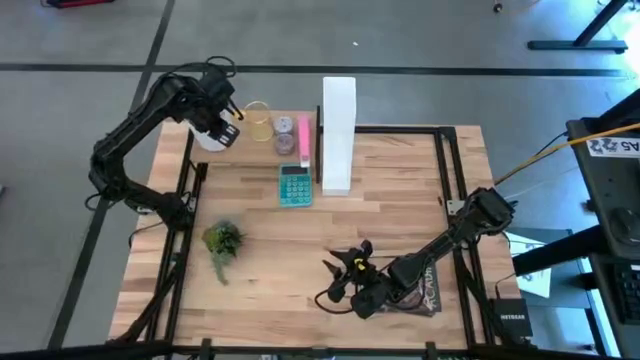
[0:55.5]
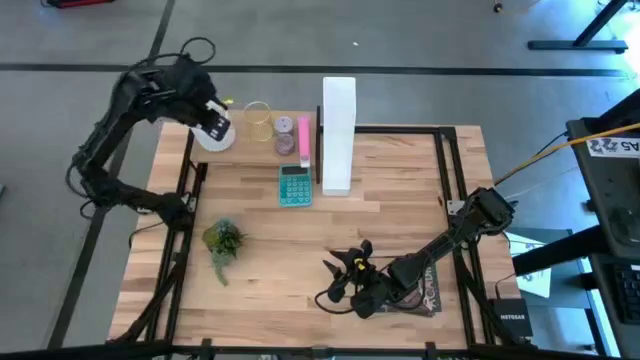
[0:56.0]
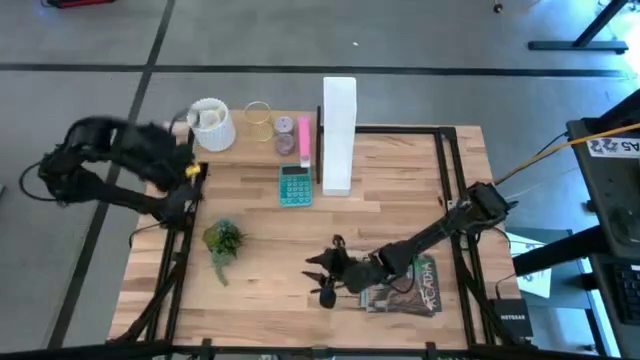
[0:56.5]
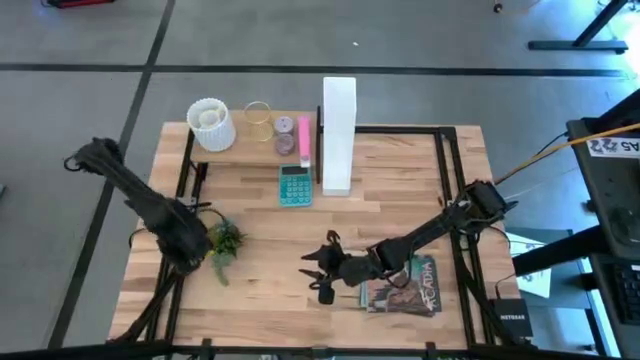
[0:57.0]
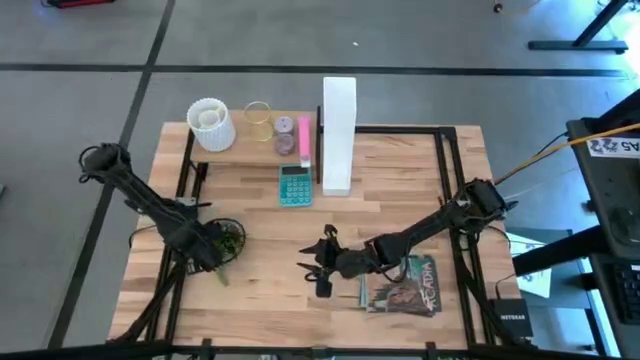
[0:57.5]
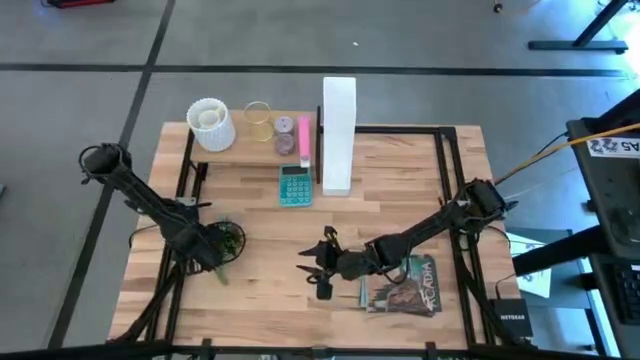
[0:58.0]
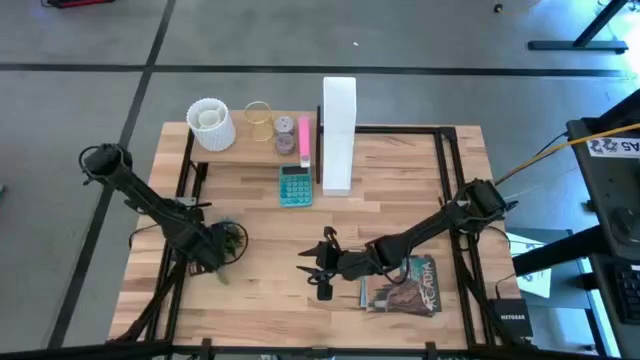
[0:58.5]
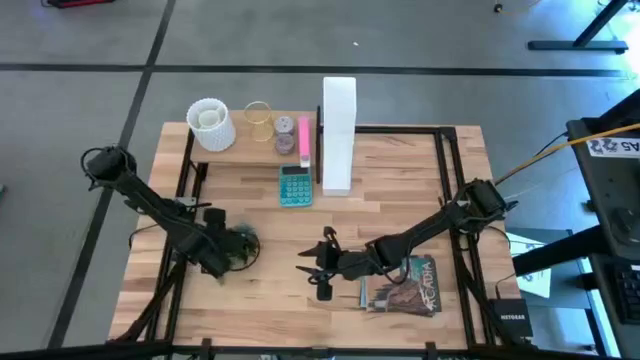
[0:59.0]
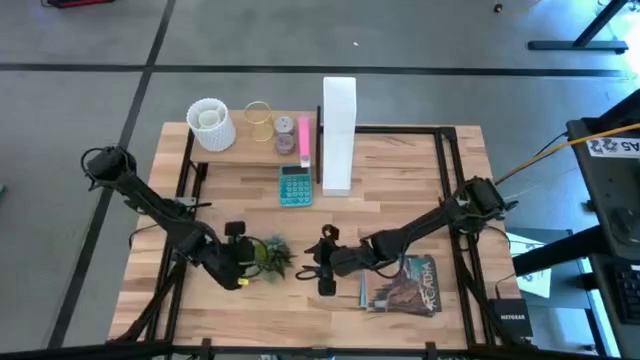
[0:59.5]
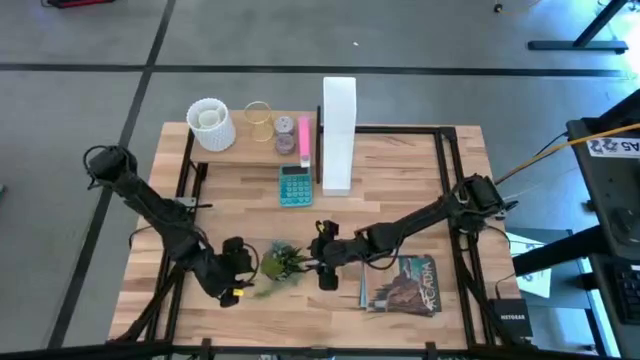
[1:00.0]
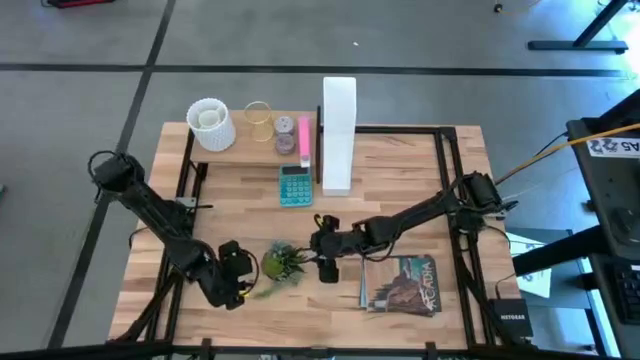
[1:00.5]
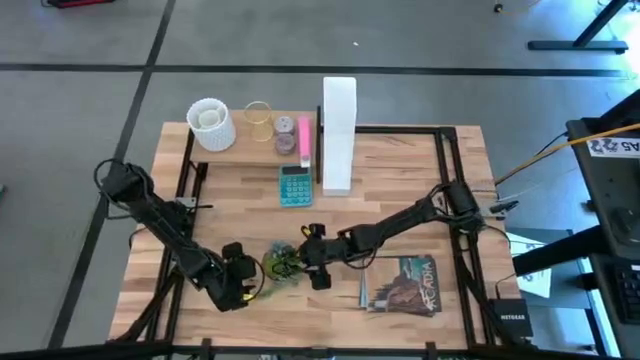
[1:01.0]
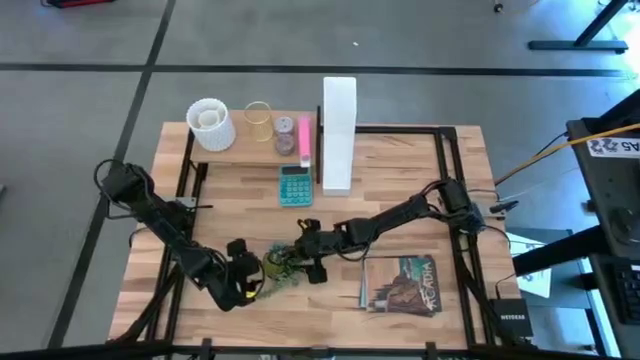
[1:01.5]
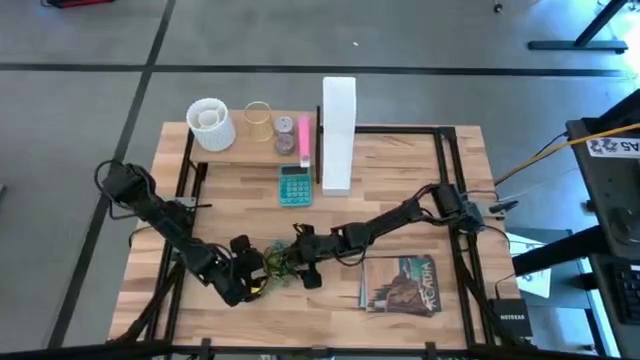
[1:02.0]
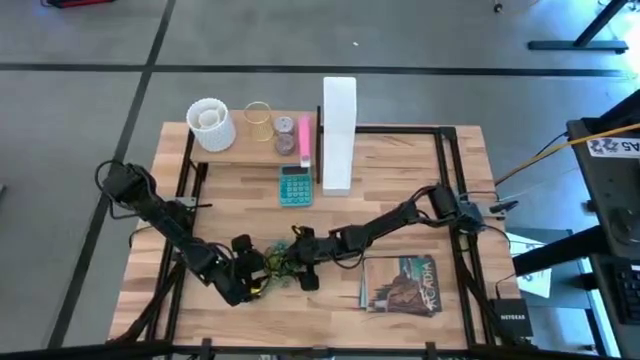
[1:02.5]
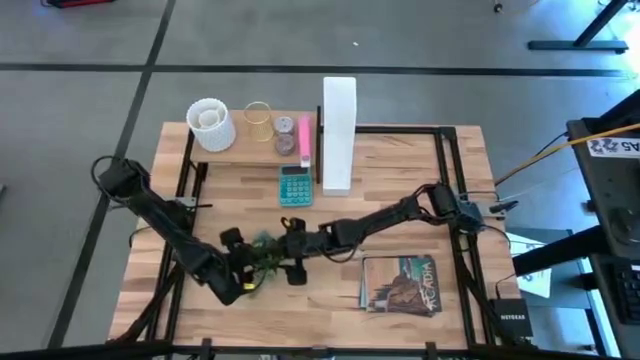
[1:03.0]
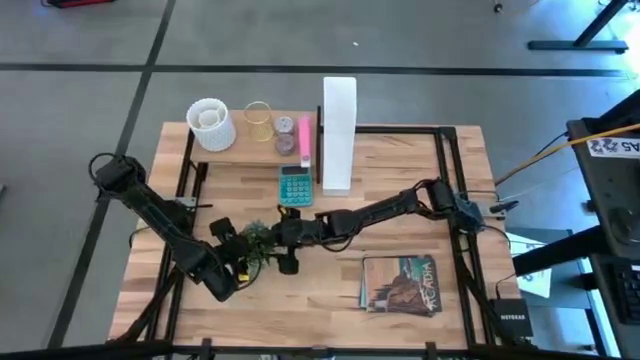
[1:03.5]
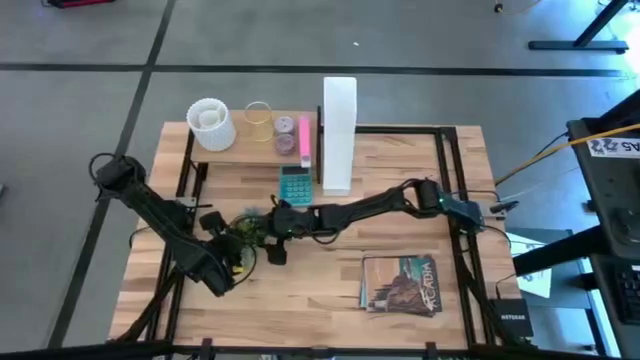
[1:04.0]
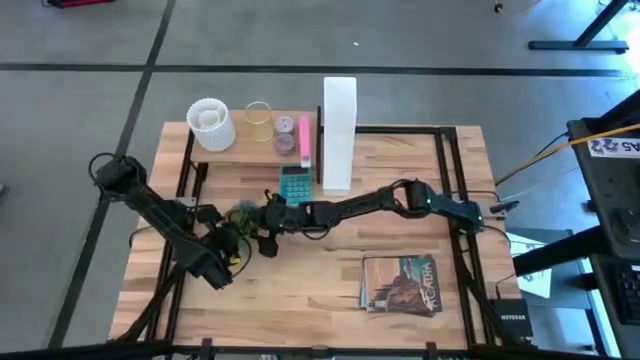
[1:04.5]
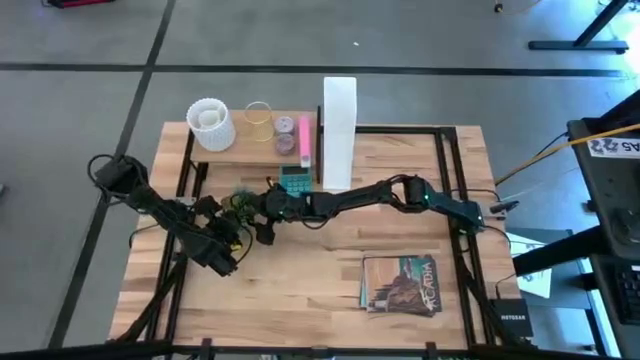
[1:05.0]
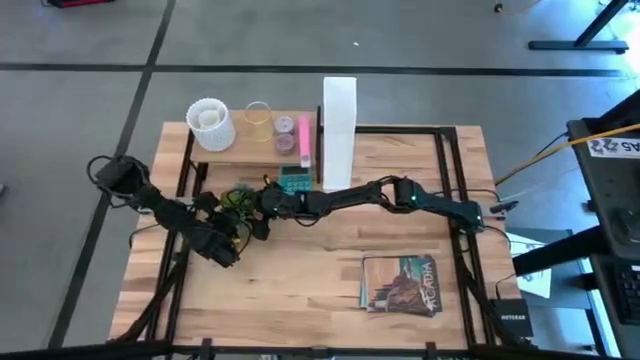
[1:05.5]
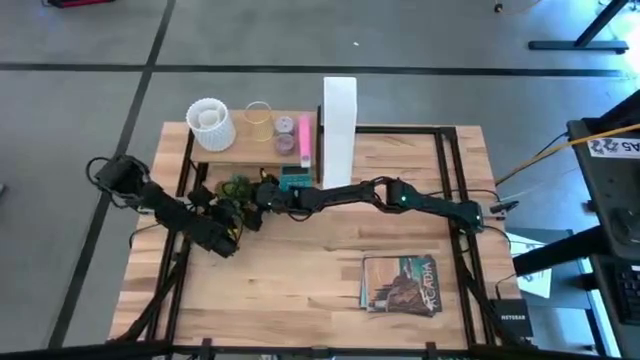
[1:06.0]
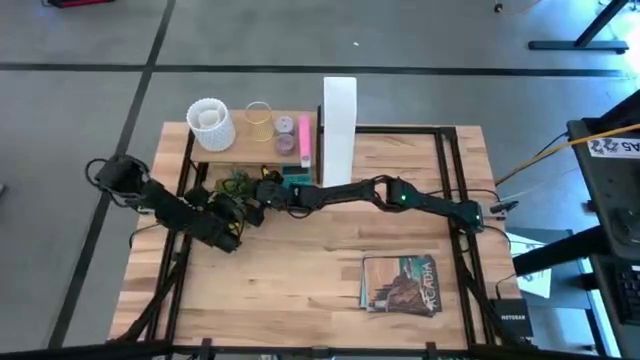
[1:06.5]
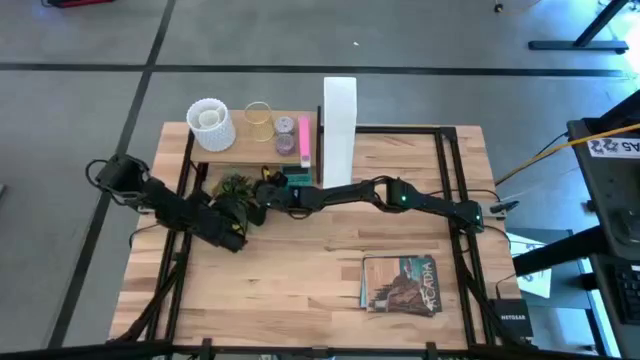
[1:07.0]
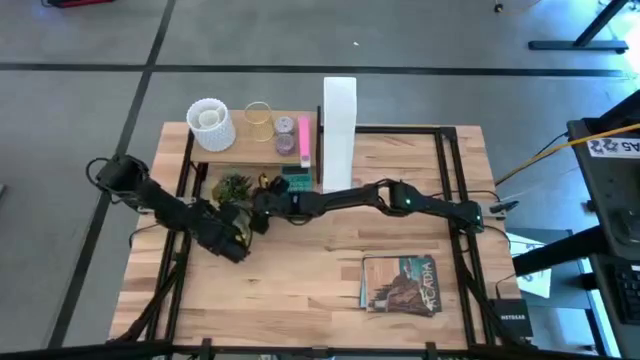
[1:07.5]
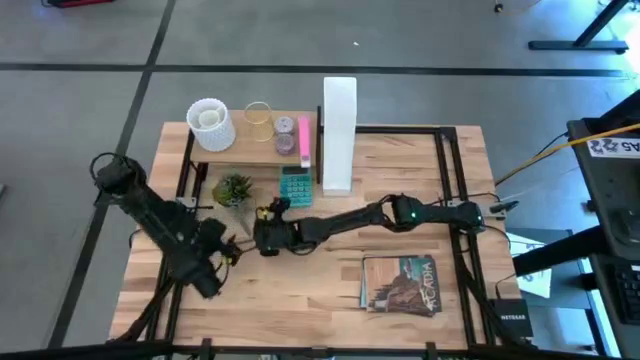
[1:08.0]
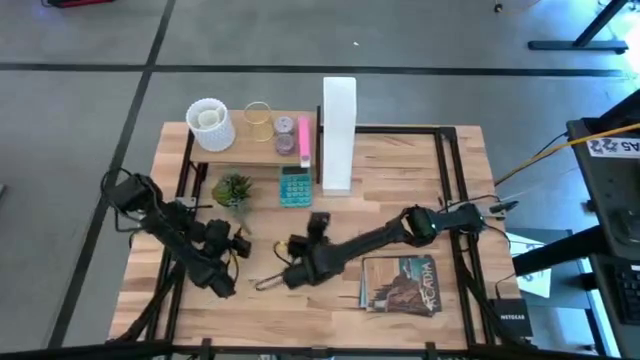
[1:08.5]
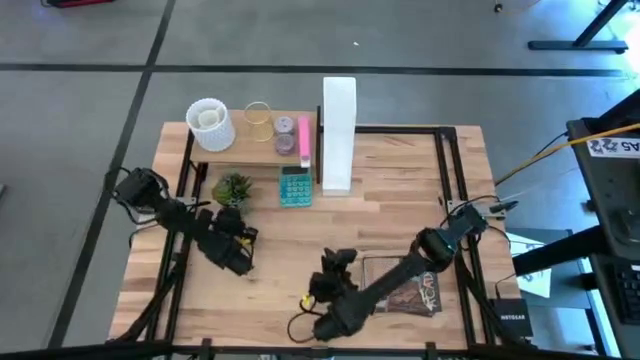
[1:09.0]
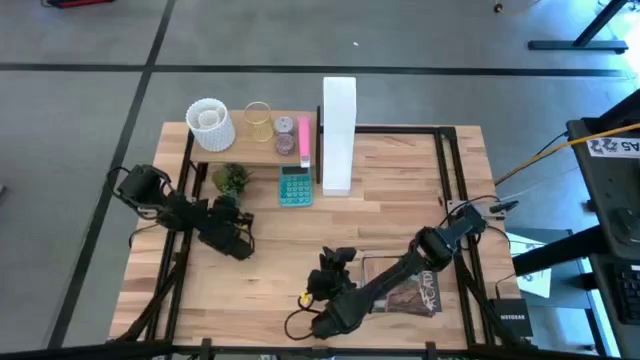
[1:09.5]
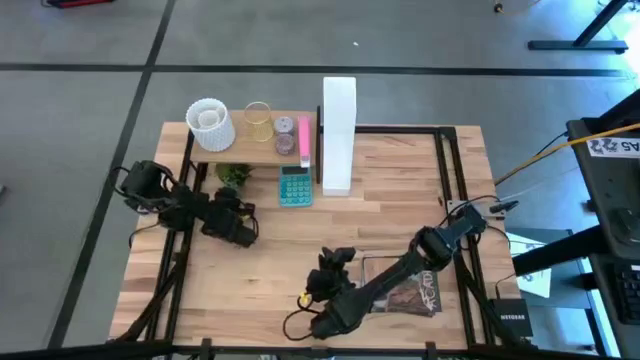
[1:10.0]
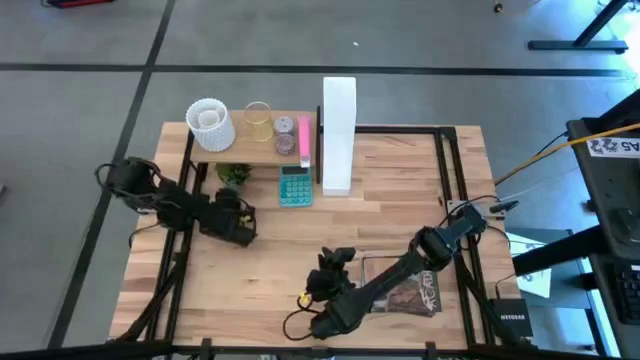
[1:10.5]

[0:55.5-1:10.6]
Task: Stock shelves
Put the plant pot under the shelf

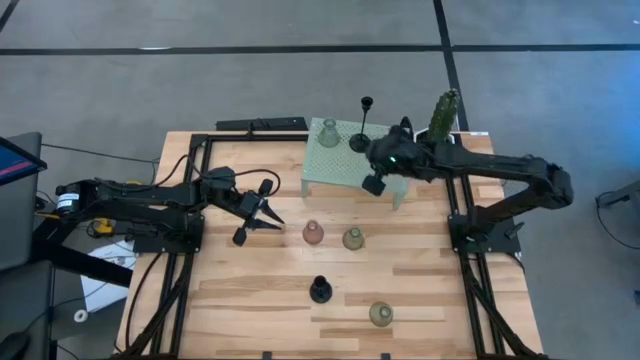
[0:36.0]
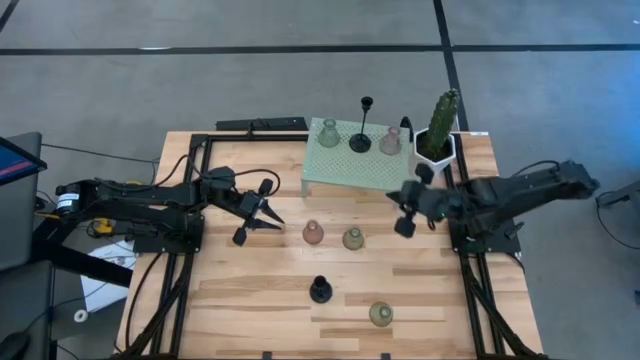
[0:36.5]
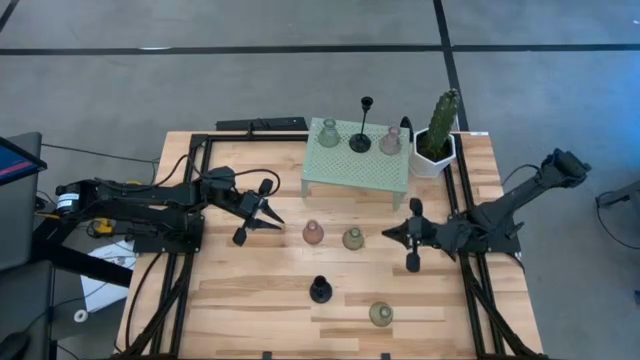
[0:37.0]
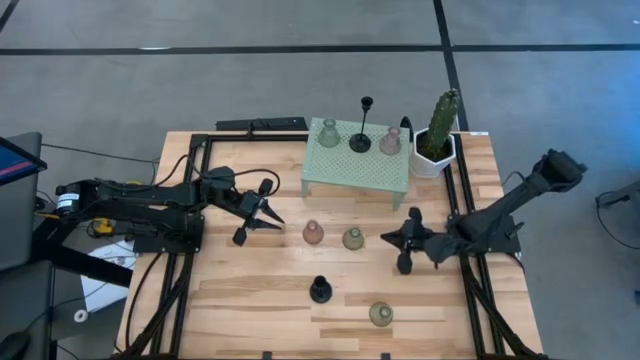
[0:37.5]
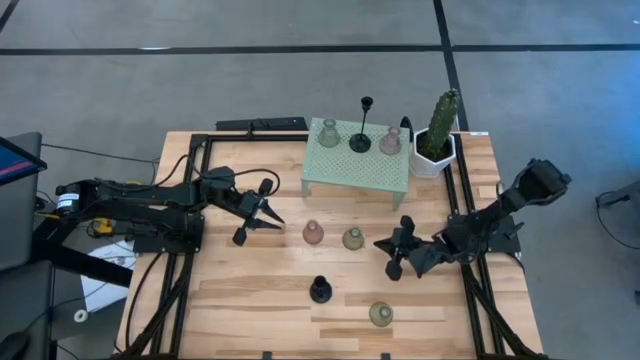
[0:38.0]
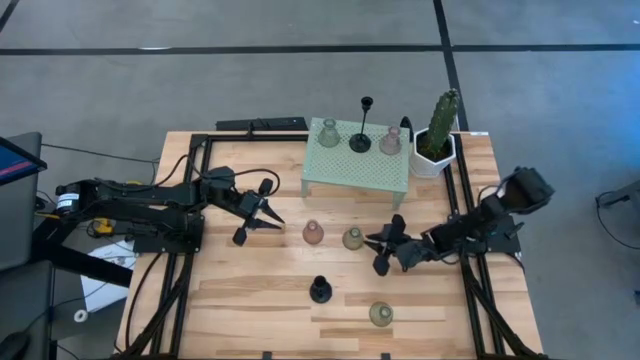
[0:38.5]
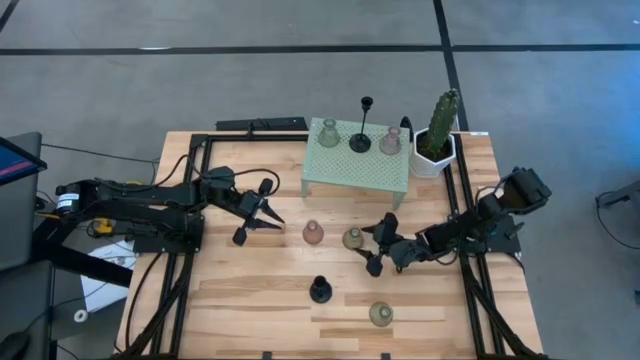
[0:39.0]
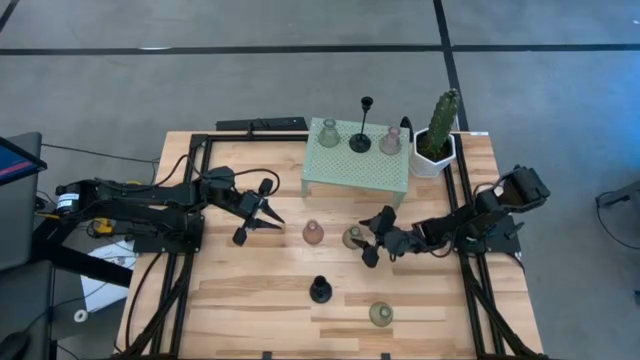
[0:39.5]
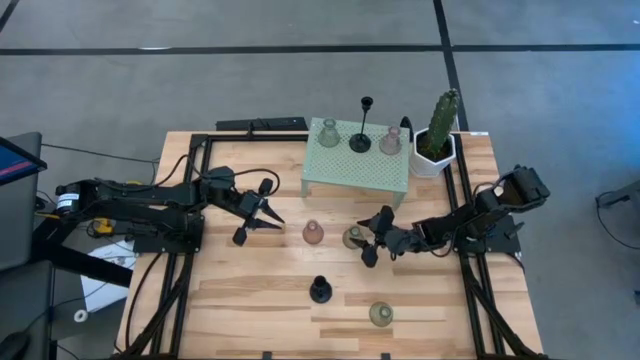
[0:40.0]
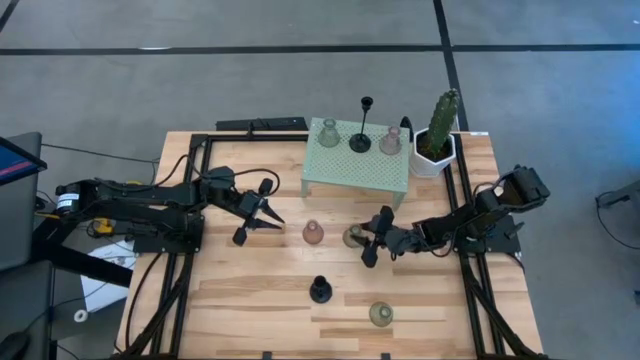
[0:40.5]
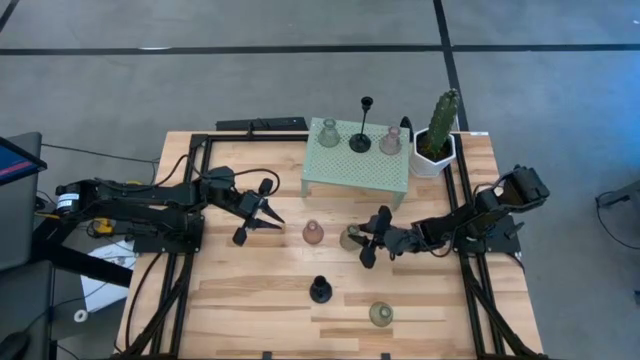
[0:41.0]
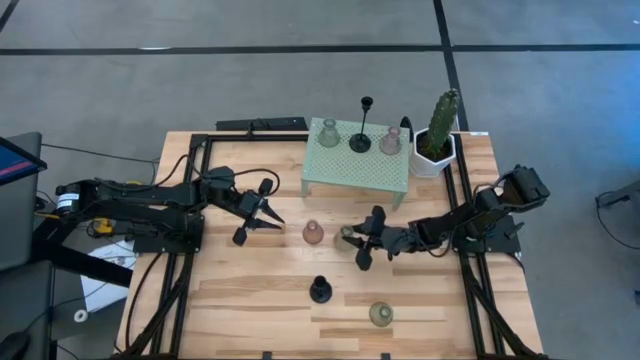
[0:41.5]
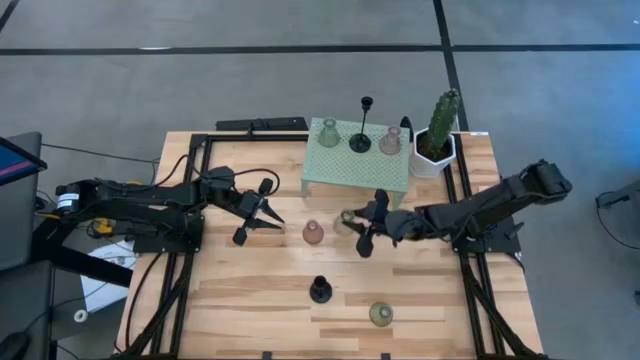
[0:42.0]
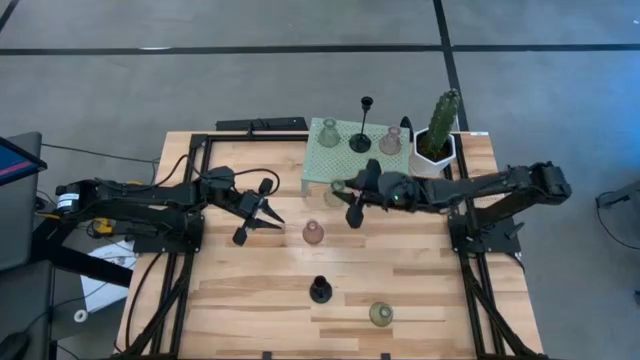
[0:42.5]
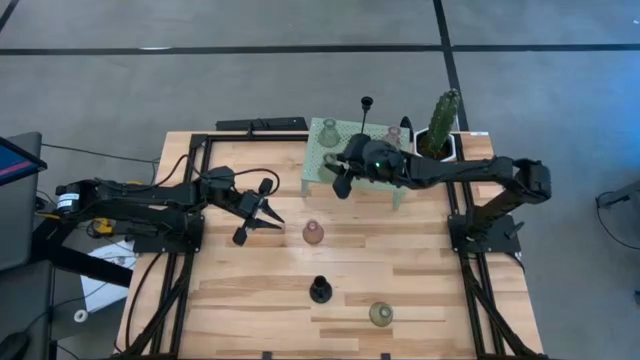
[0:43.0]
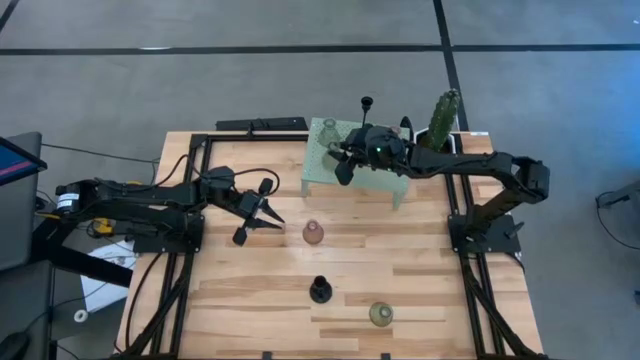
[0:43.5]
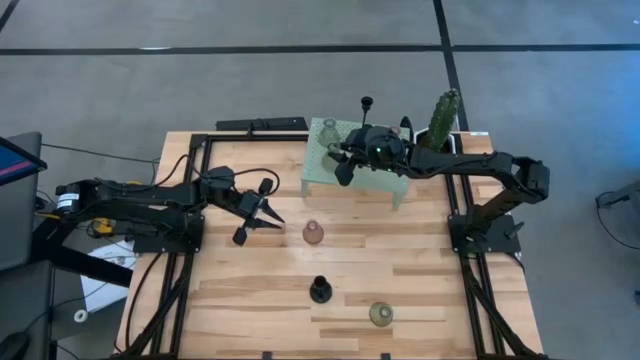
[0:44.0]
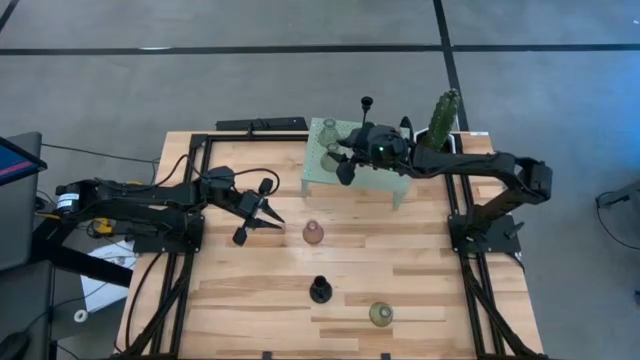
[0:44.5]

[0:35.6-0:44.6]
Task: Pick & Place candle stick holders
Put the top green glass candle holder on the shelf aligned with the other green glass candle holder
